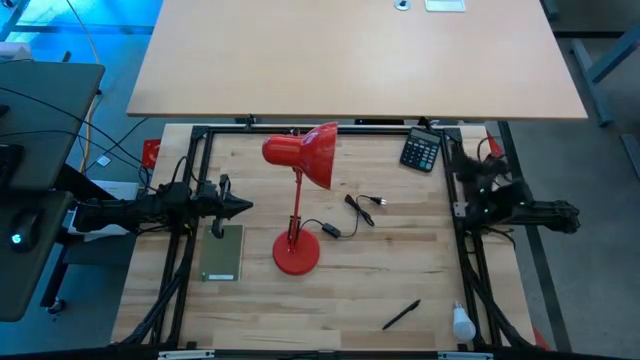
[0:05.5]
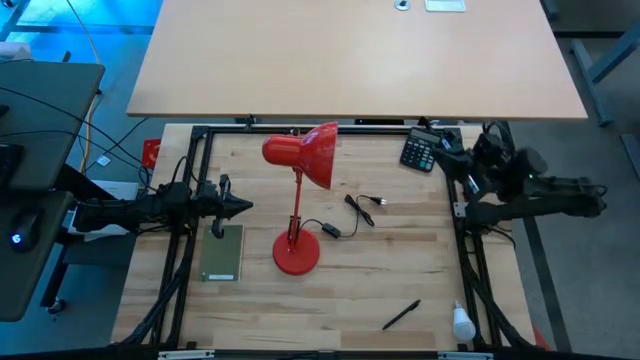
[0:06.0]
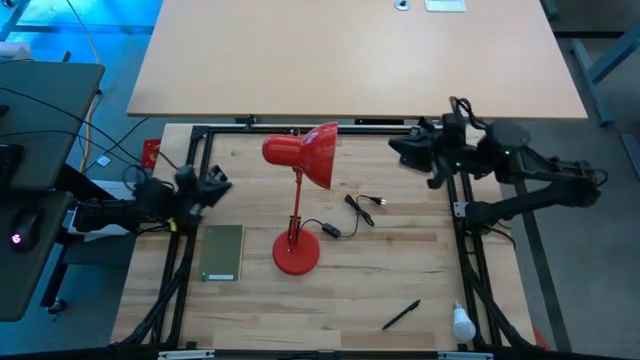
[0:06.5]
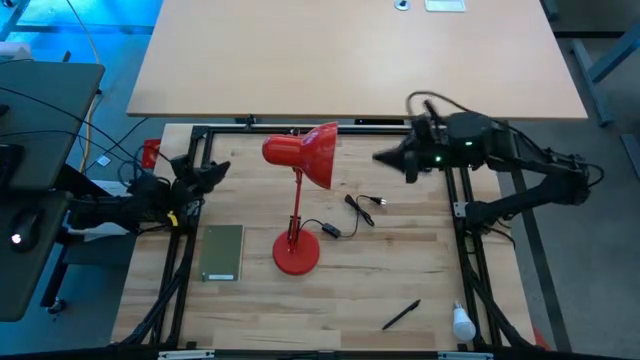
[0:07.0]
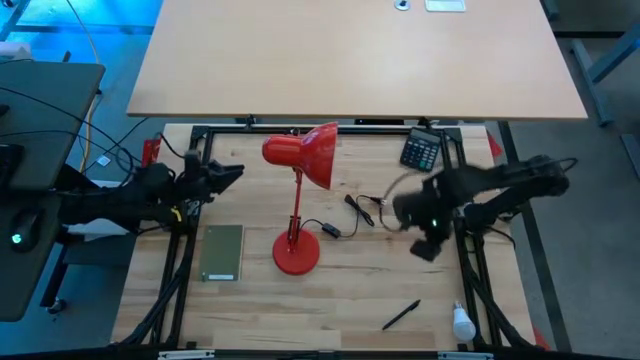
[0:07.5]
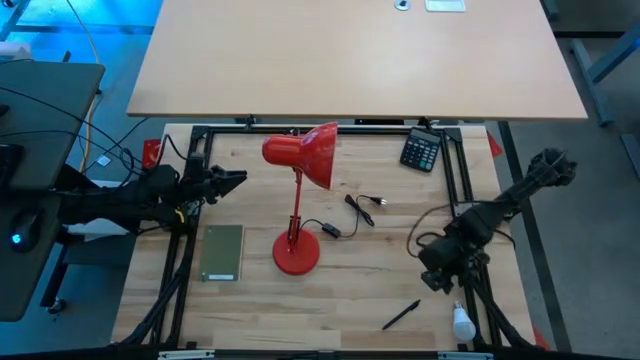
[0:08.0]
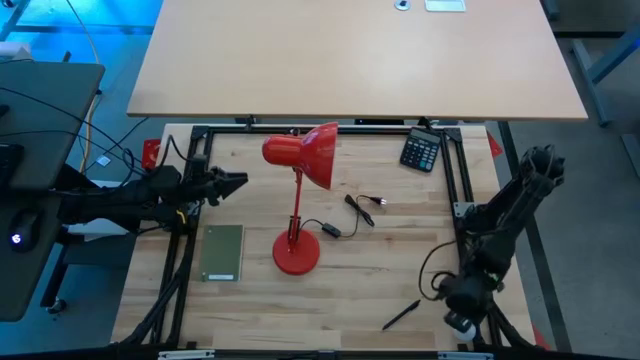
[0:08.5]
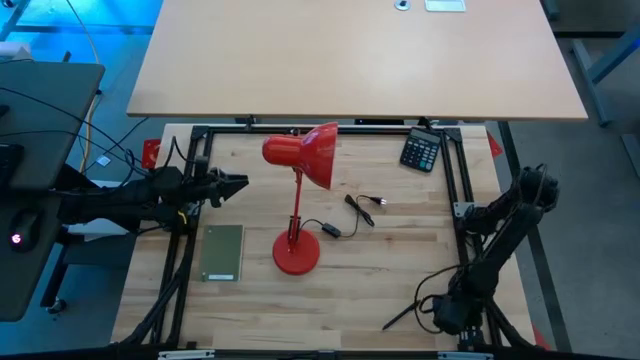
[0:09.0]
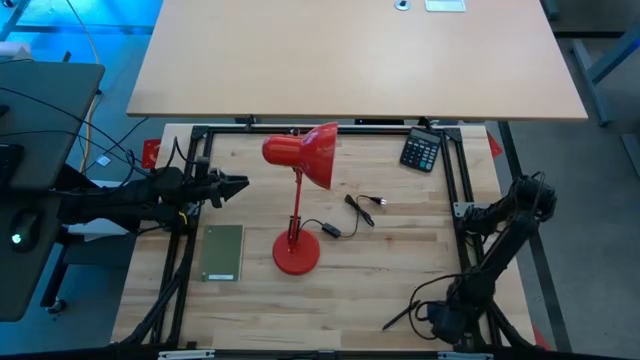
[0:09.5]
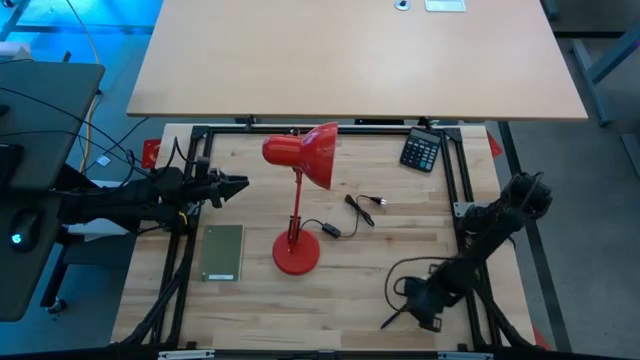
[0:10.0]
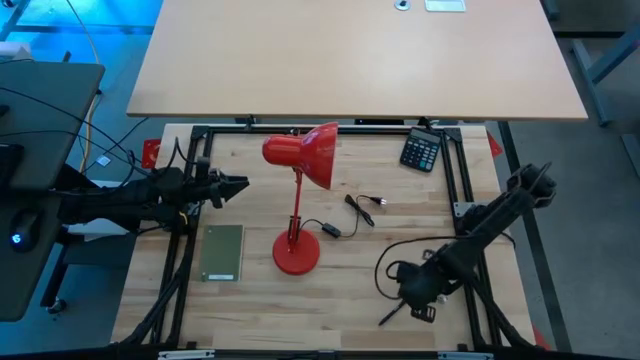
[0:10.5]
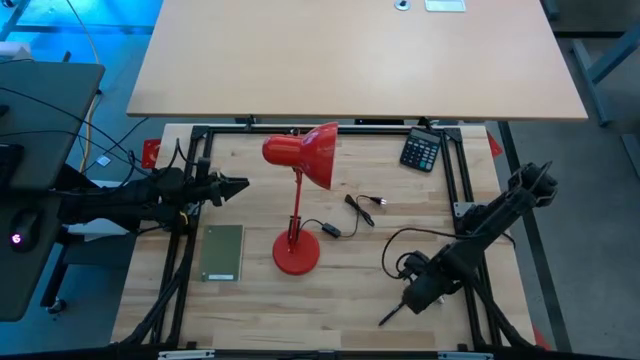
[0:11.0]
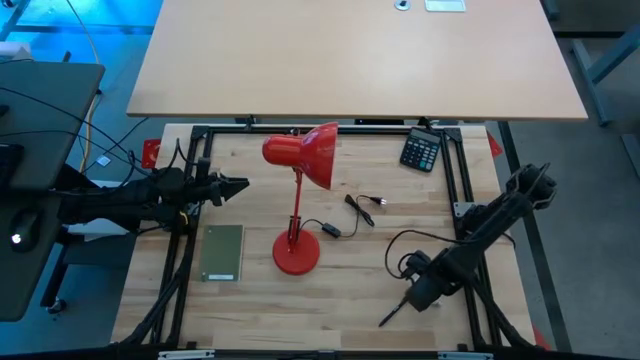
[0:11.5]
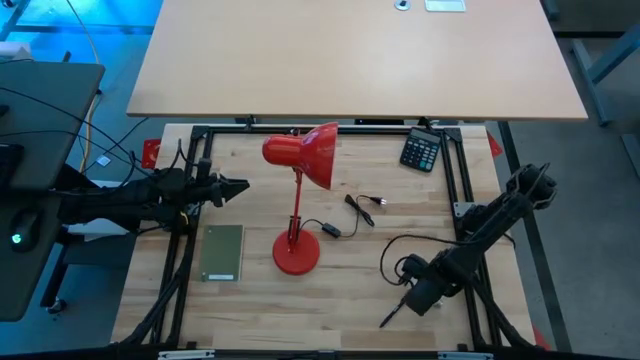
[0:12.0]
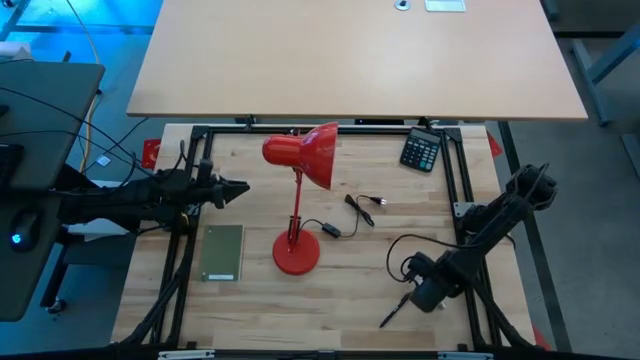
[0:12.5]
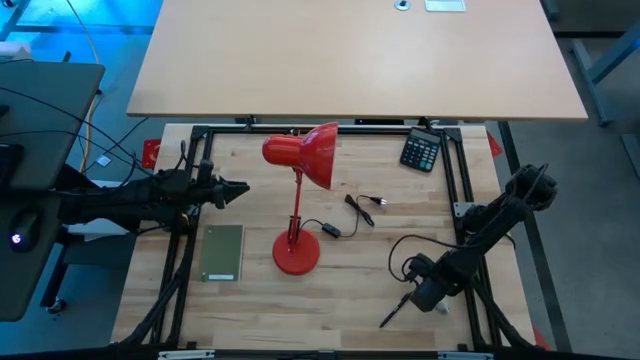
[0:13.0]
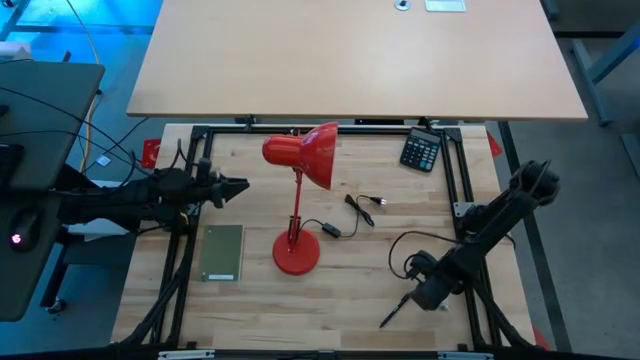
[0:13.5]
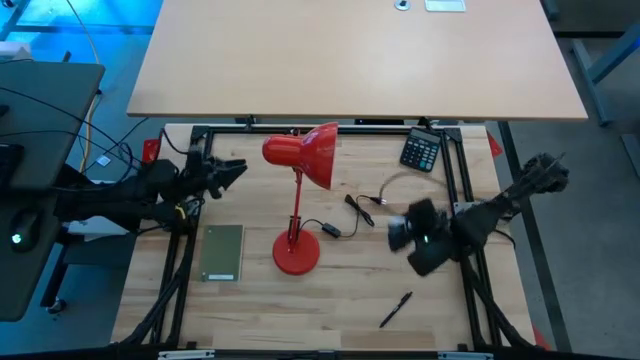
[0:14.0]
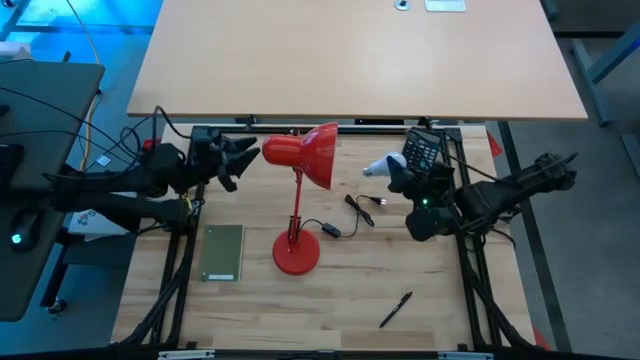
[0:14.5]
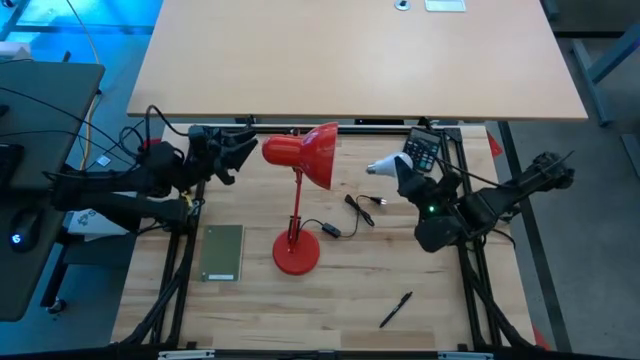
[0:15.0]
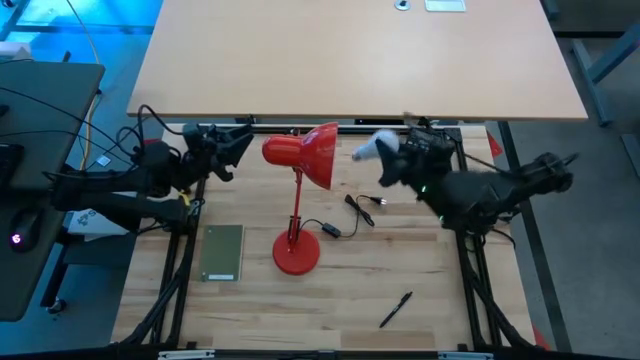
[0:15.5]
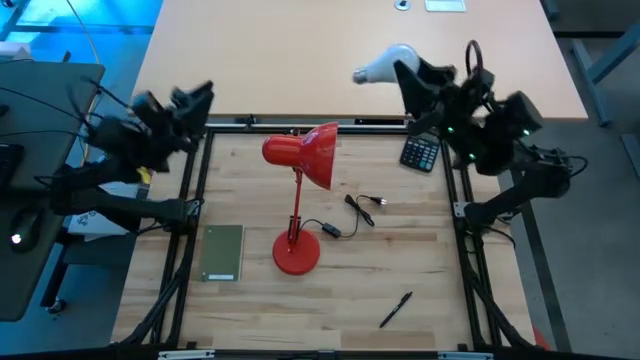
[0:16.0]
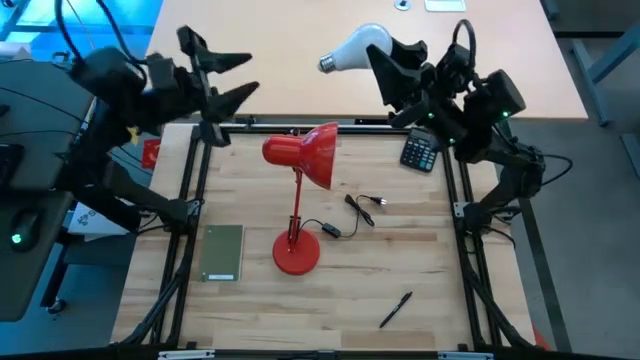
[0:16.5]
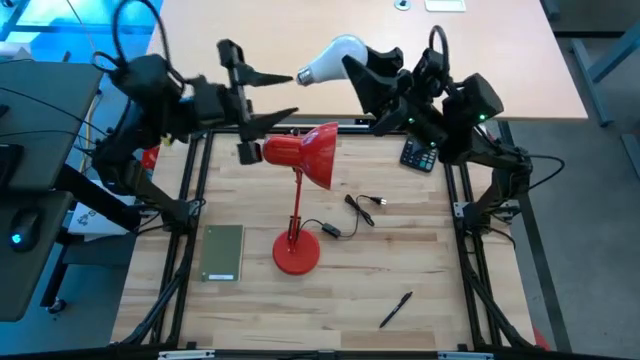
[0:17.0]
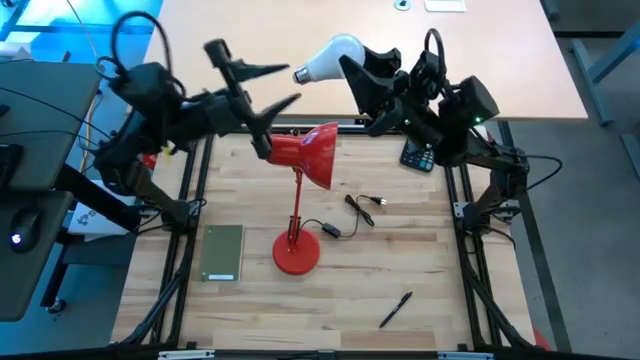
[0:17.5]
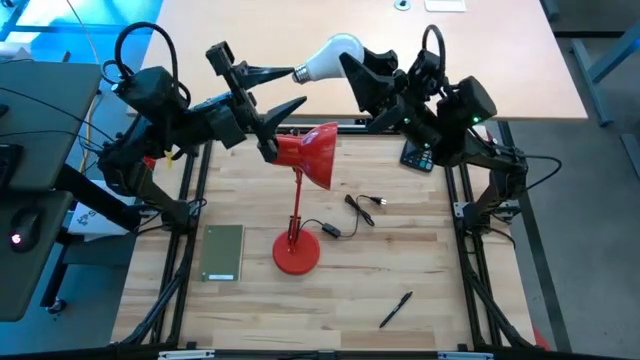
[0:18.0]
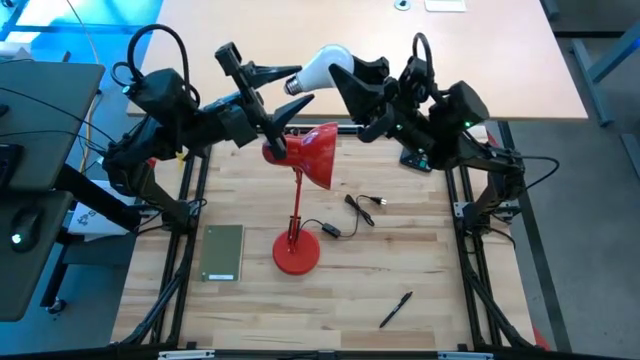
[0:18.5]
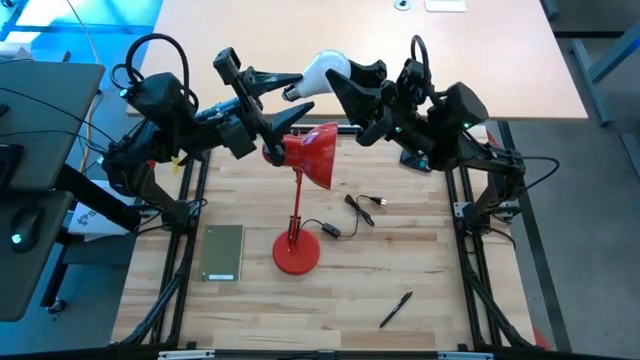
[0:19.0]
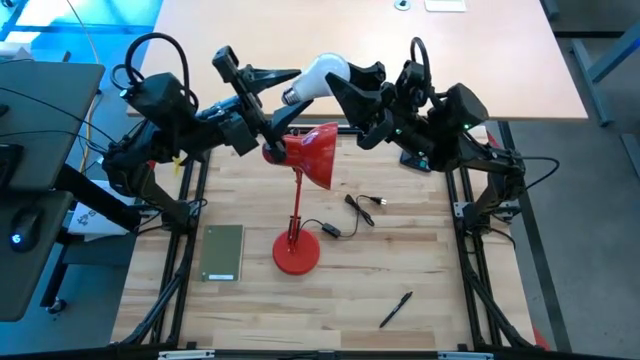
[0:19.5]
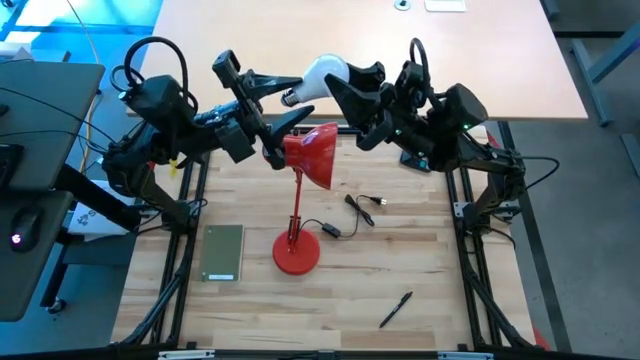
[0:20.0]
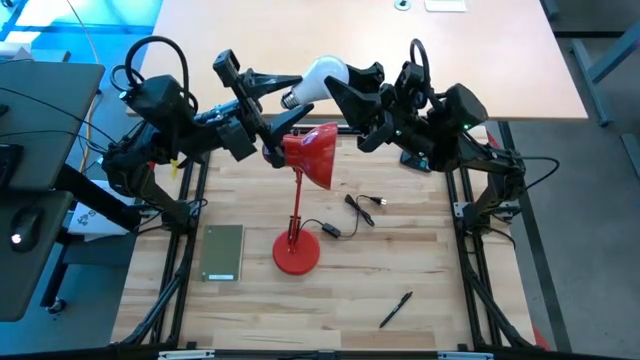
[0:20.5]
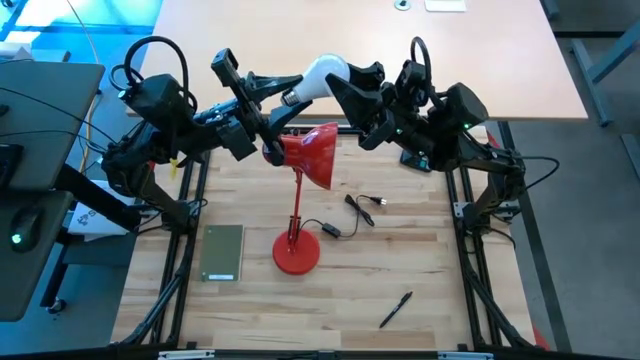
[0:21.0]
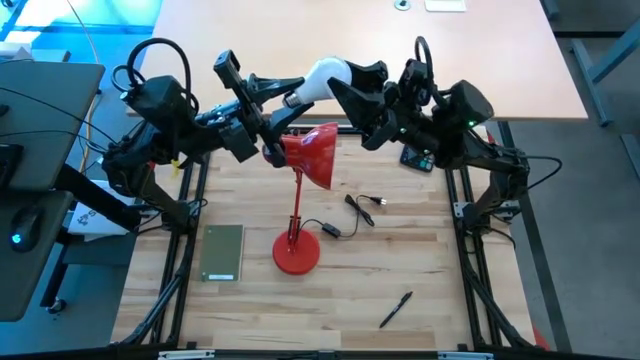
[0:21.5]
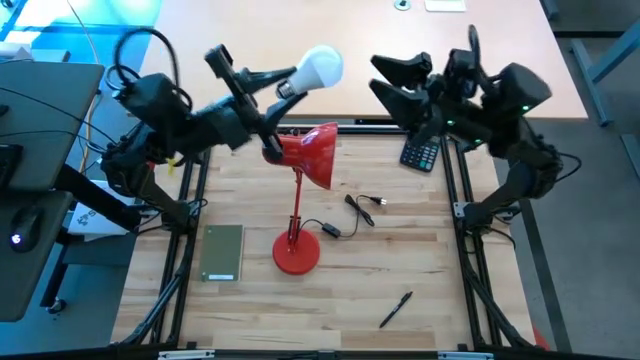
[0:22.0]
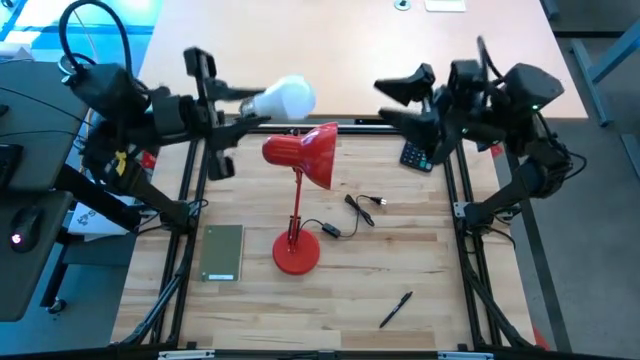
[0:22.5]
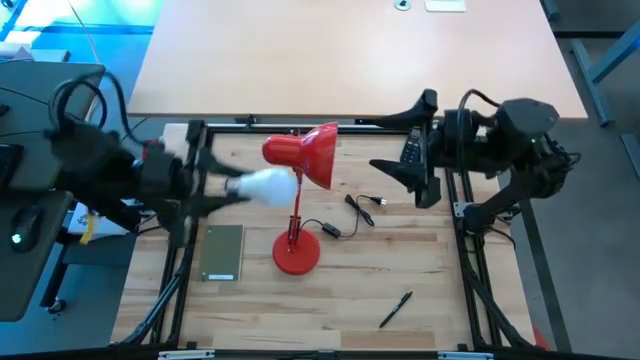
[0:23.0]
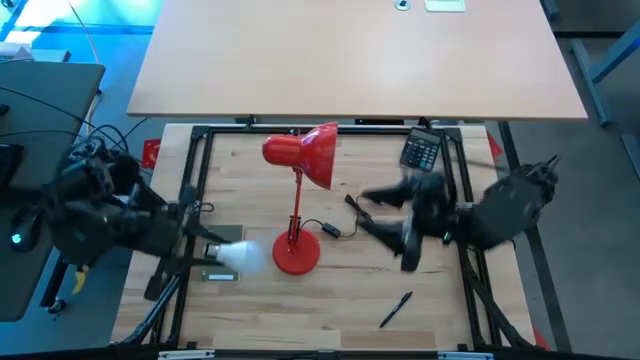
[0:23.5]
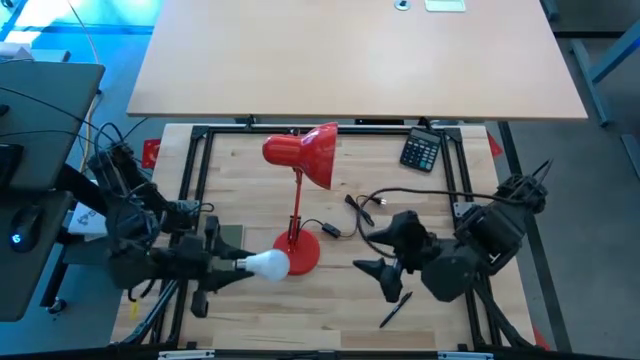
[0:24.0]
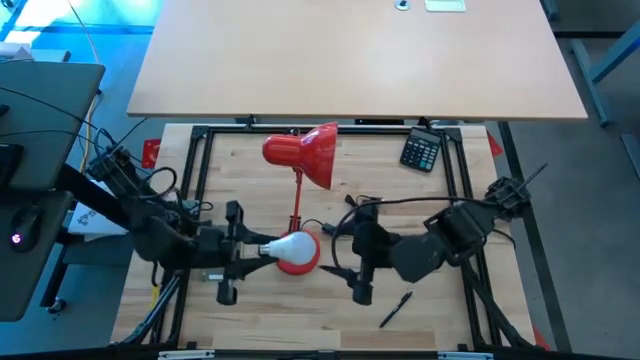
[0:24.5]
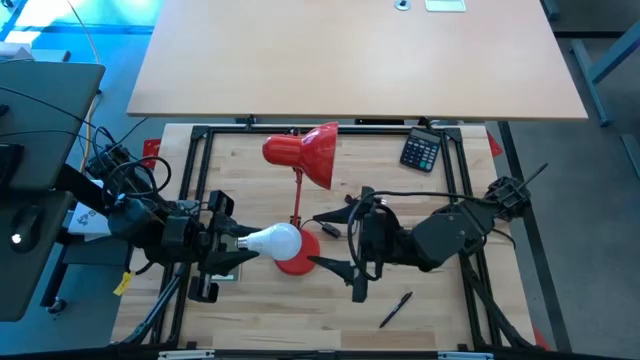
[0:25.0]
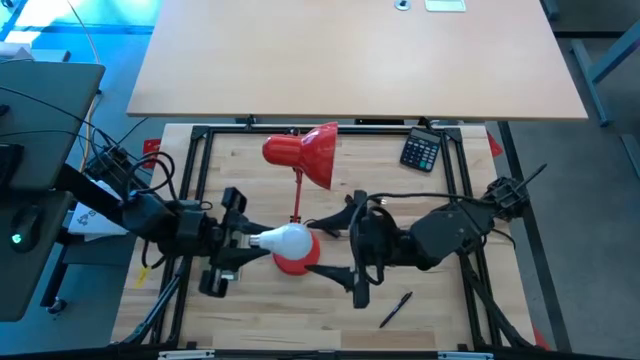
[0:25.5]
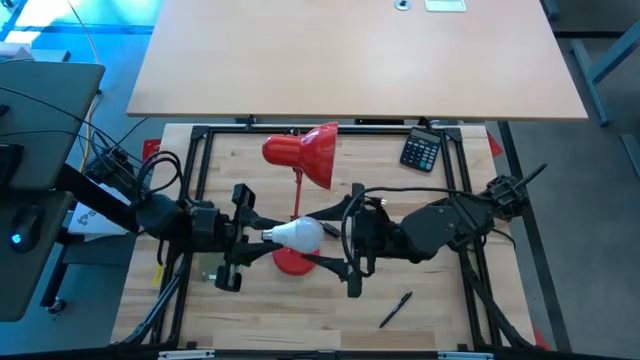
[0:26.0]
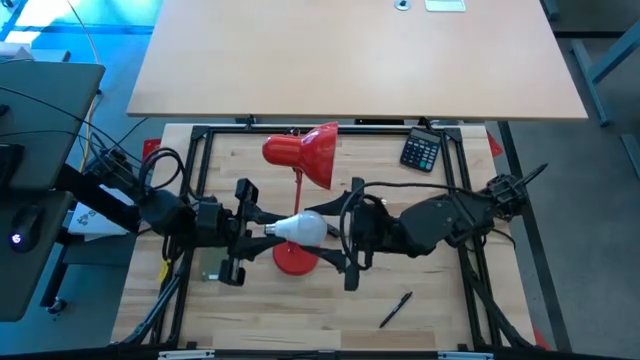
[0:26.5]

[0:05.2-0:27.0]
Task: Screw lightbulb
Insert the white lightbulb into the red lamp
